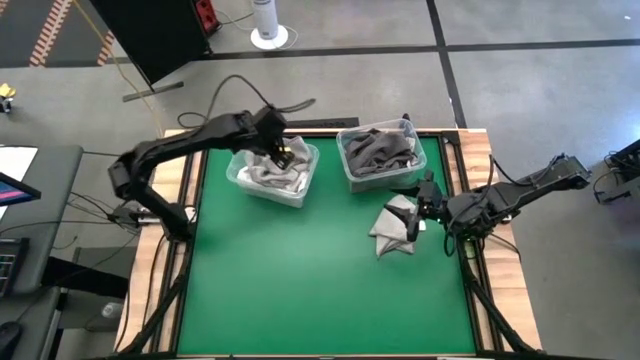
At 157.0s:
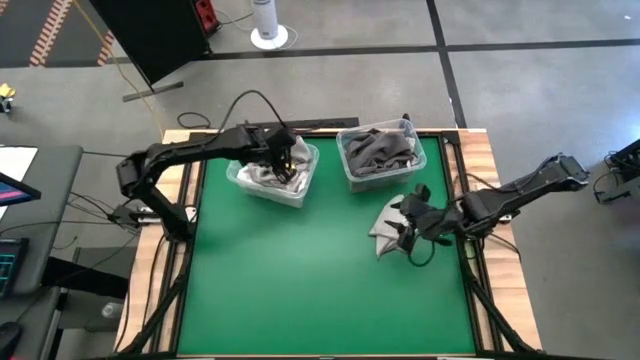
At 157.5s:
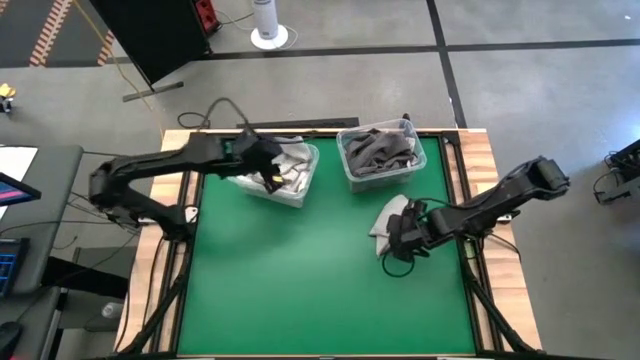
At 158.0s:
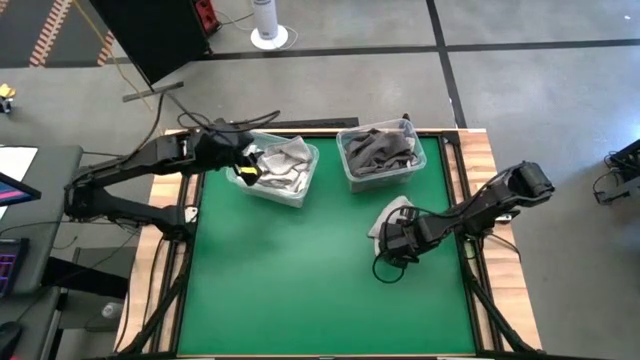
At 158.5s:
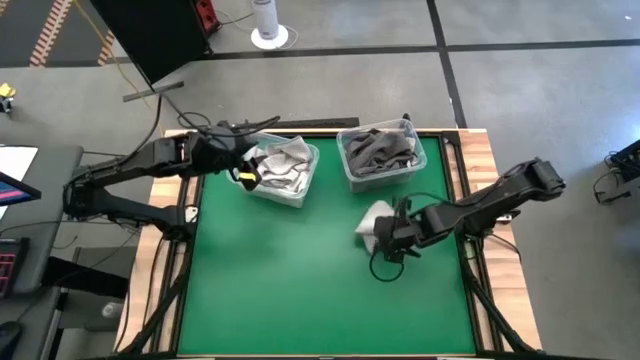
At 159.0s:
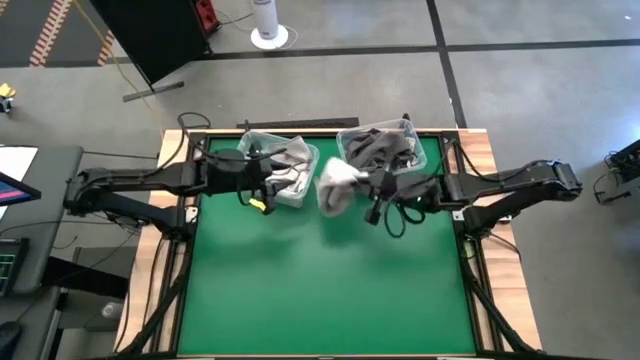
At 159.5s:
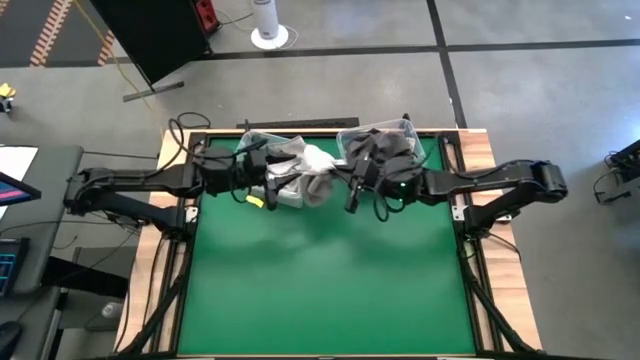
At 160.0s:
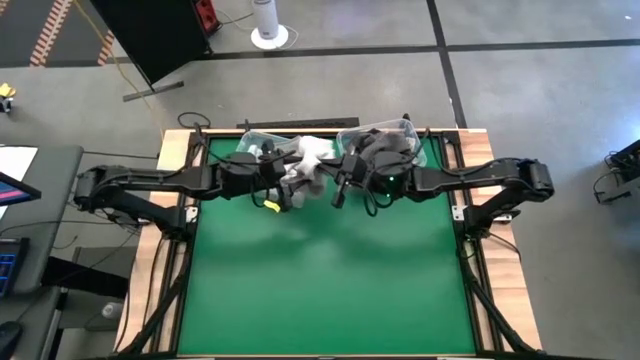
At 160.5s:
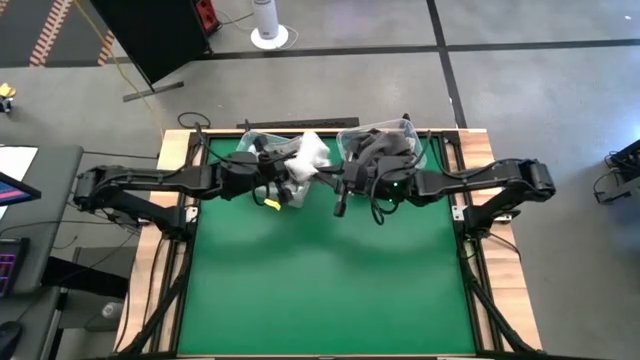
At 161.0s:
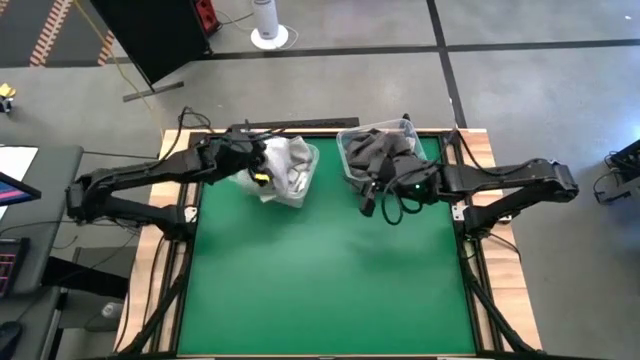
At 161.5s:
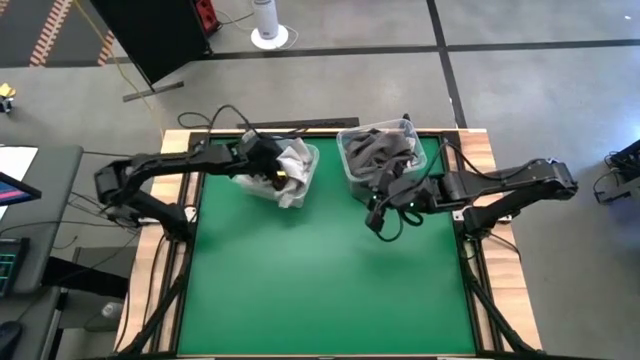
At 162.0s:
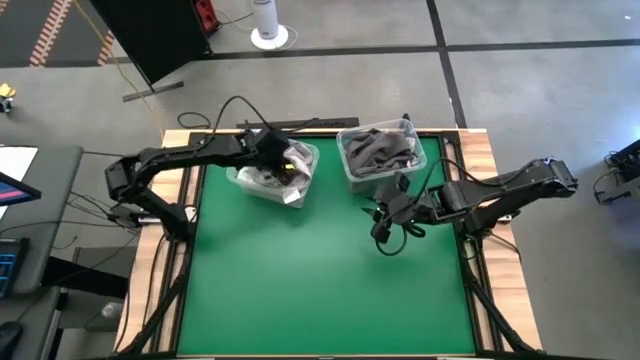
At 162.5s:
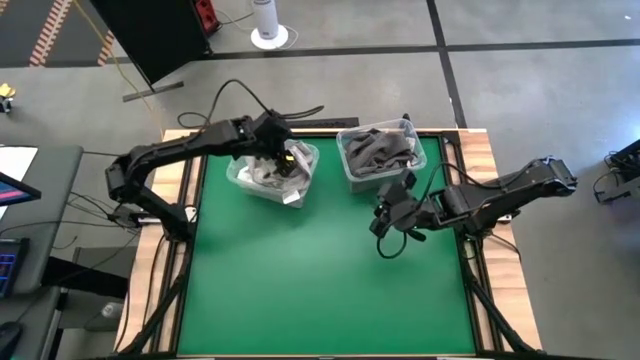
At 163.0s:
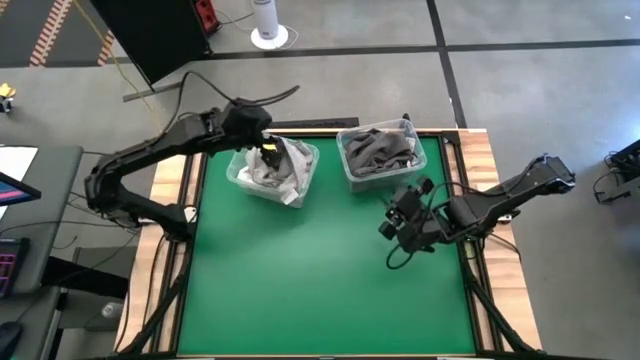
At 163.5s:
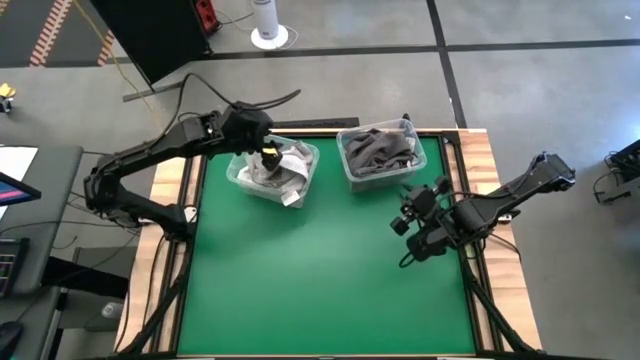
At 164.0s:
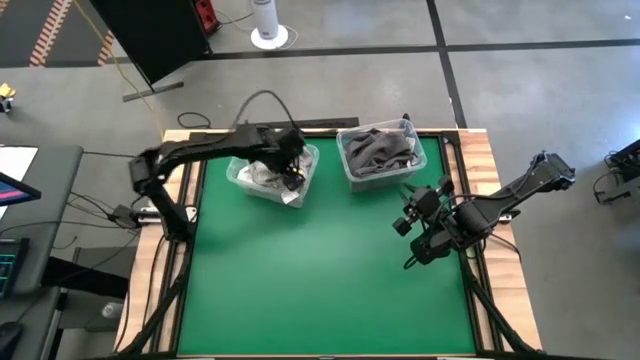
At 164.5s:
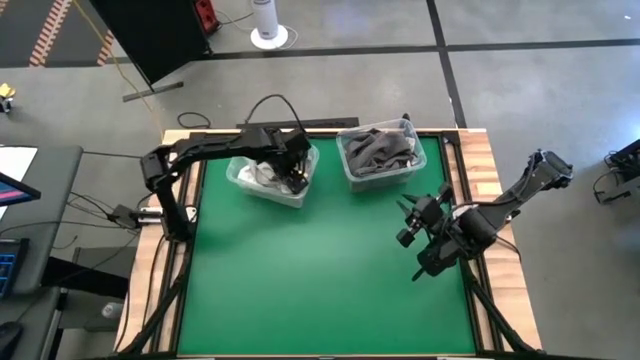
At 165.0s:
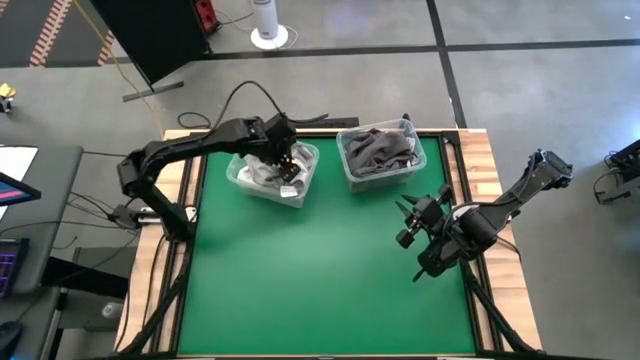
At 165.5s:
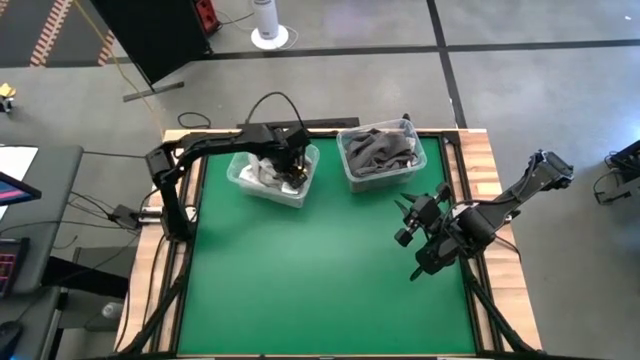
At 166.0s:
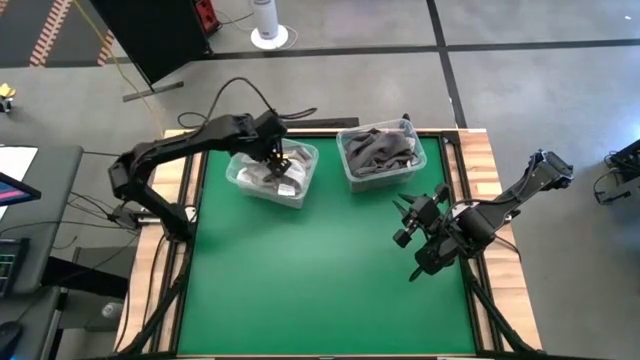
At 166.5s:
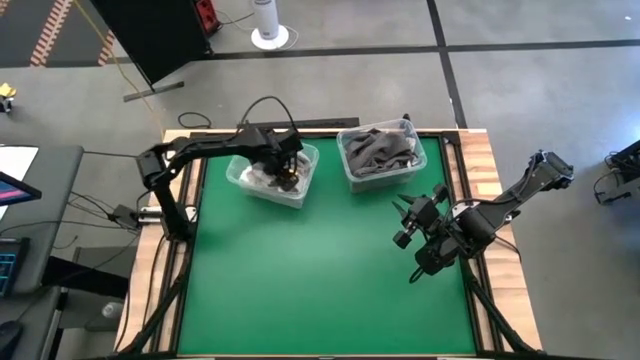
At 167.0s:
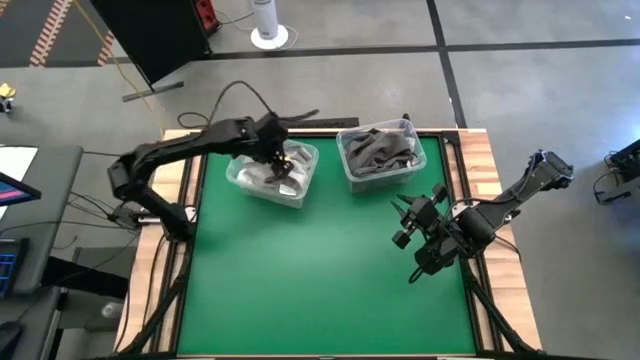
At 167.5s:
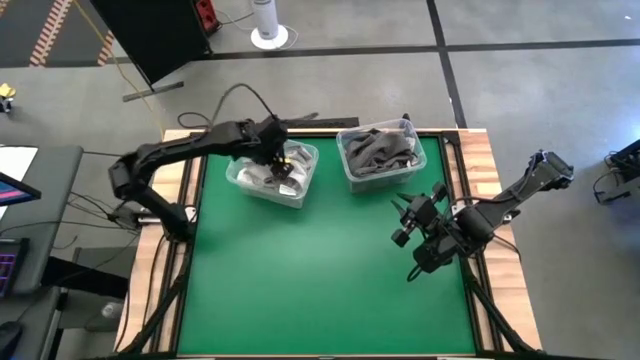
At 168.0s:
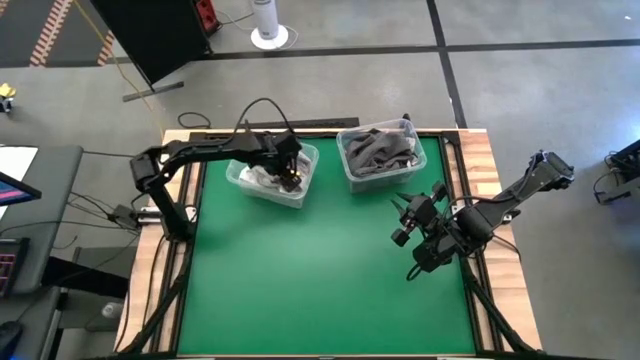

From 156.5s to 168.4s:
Task: Sort towels by color in basket
Put the gray microfiber towel into the left transparent bin

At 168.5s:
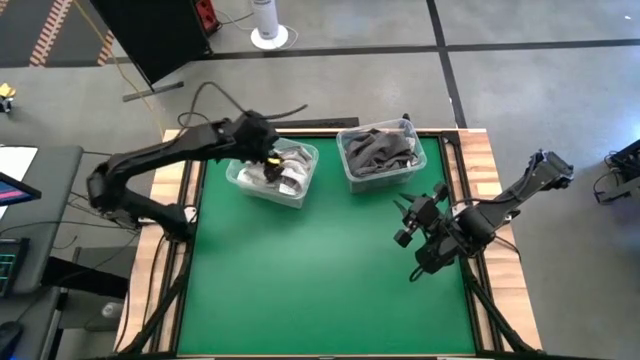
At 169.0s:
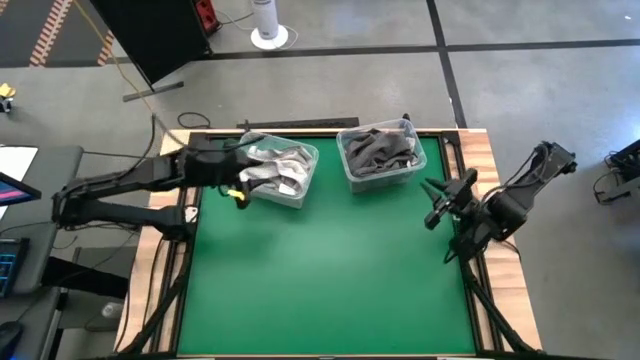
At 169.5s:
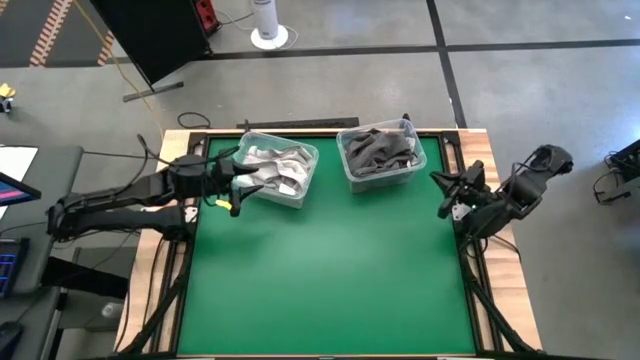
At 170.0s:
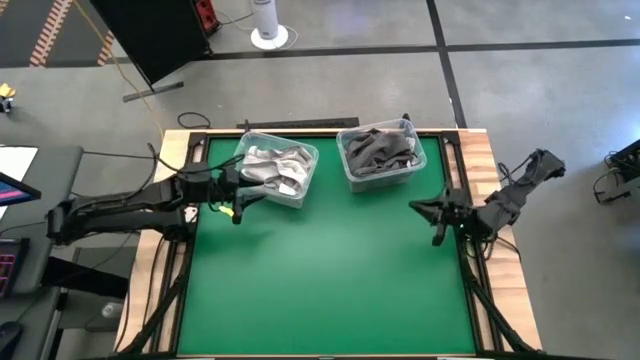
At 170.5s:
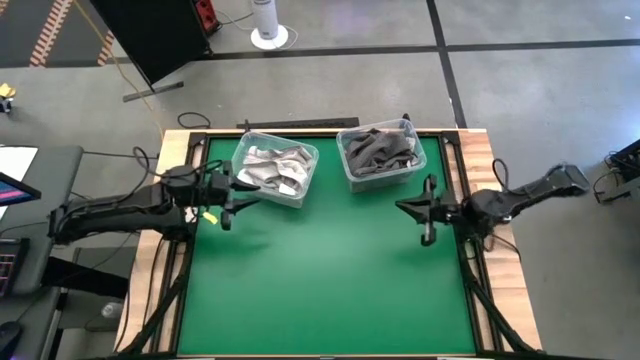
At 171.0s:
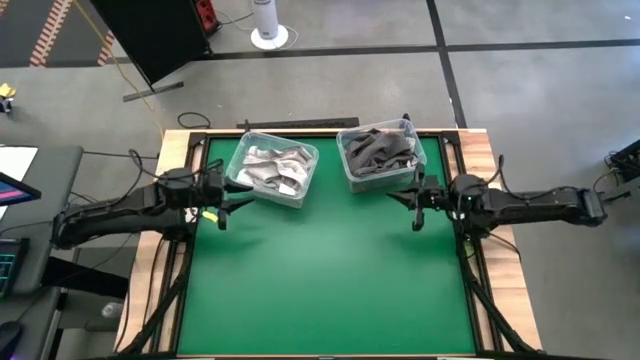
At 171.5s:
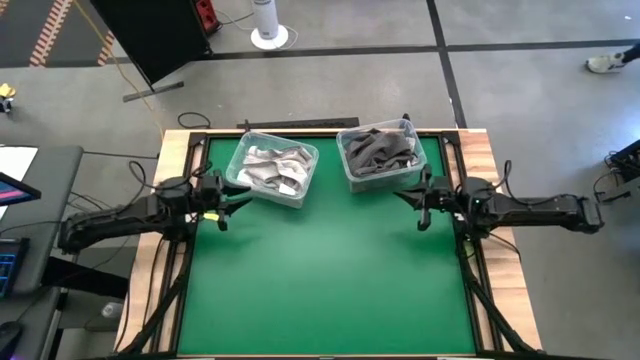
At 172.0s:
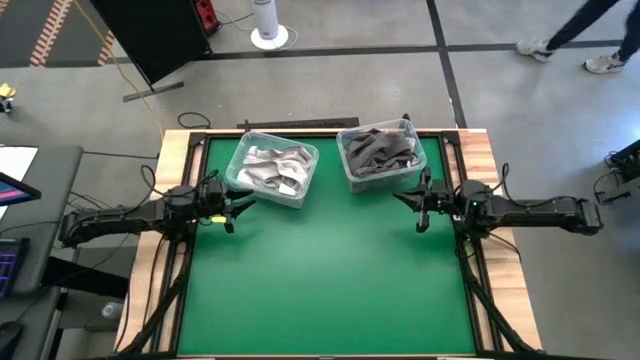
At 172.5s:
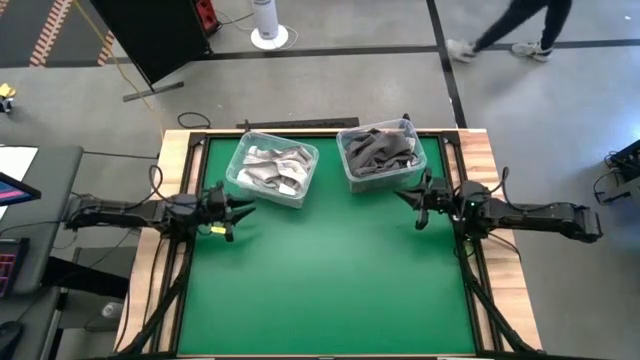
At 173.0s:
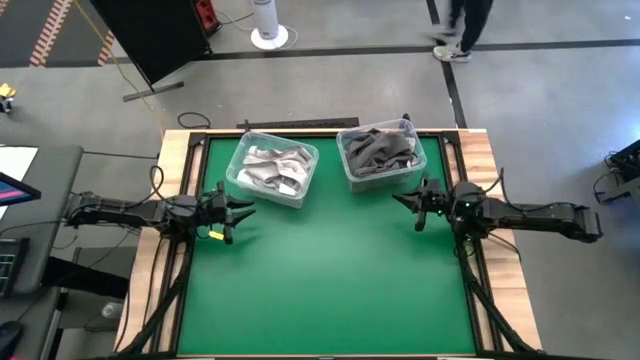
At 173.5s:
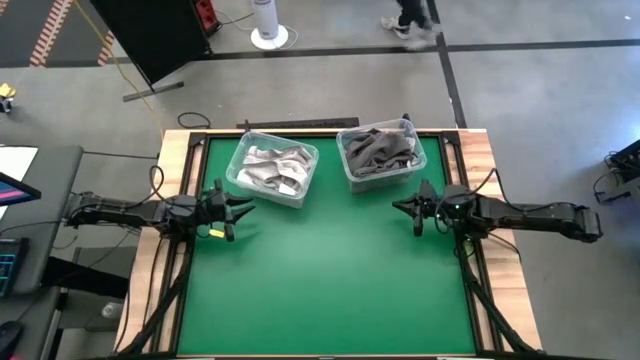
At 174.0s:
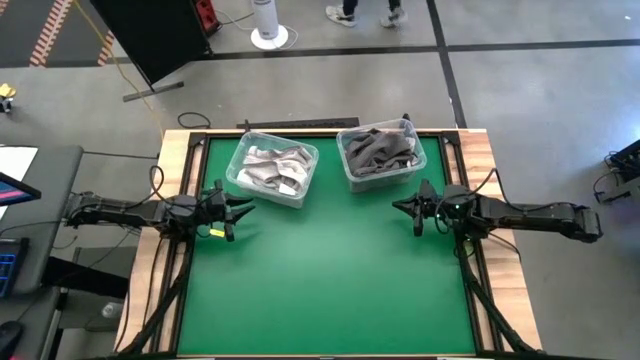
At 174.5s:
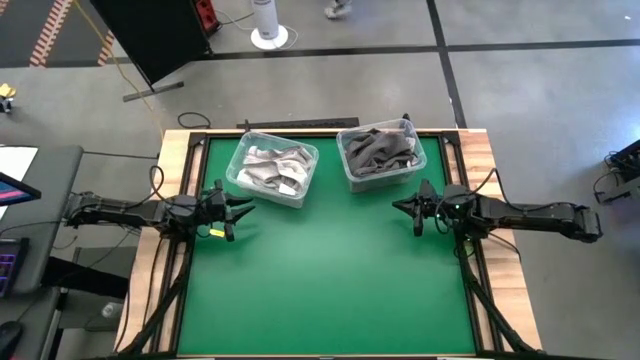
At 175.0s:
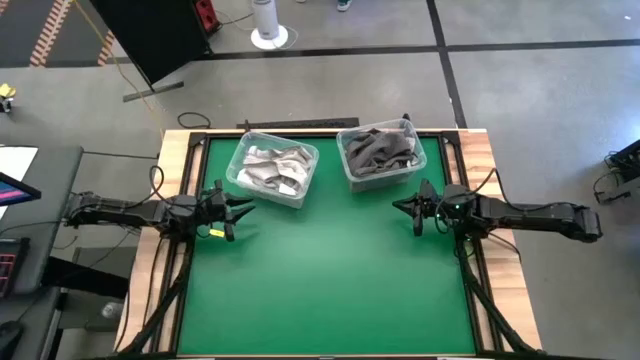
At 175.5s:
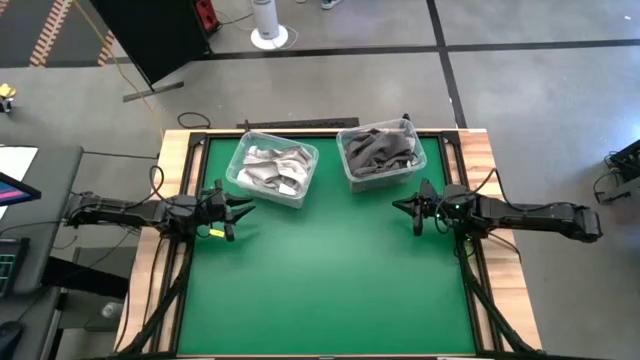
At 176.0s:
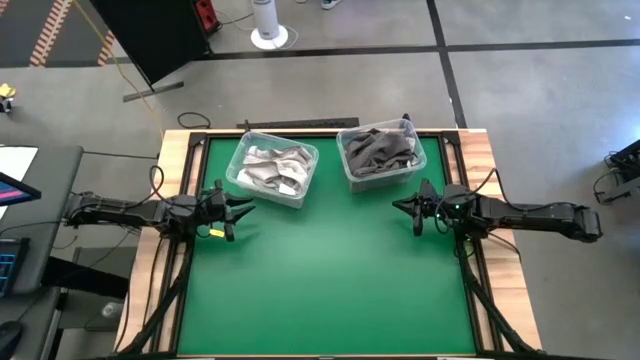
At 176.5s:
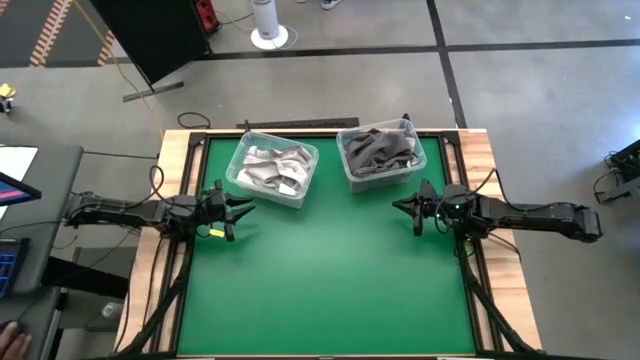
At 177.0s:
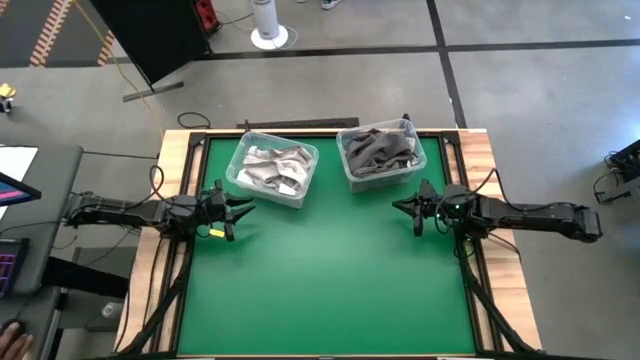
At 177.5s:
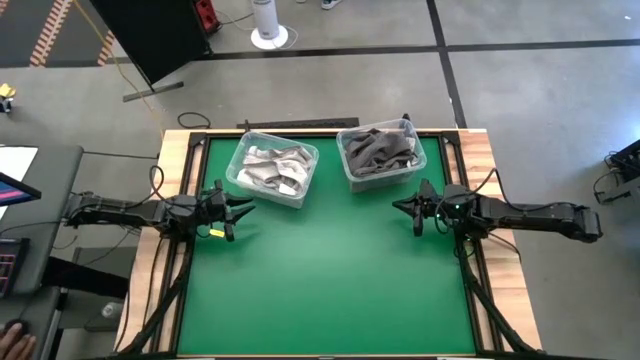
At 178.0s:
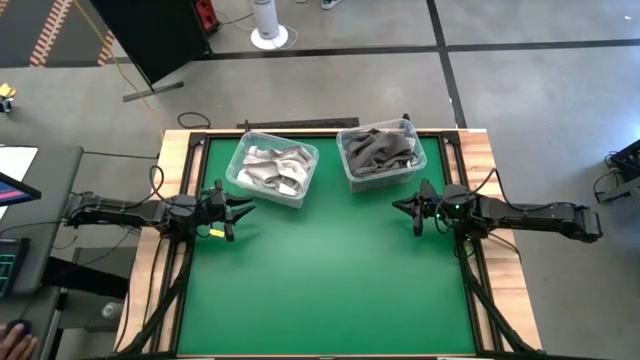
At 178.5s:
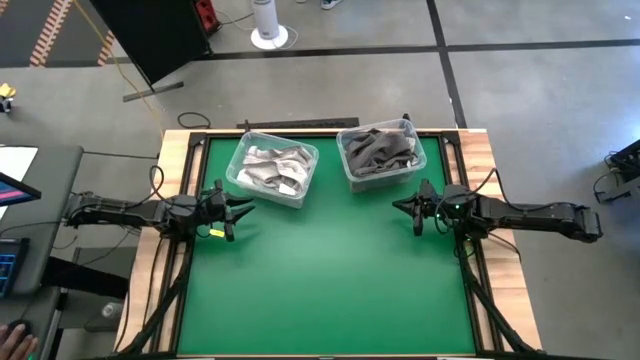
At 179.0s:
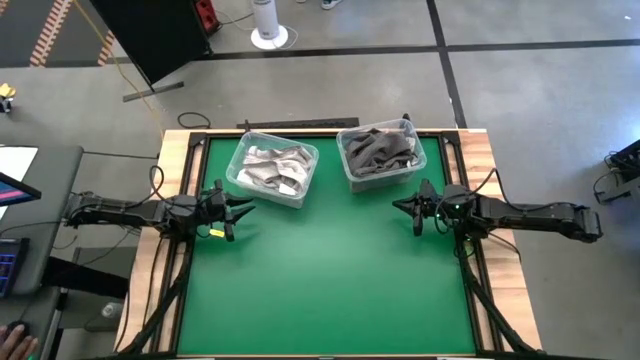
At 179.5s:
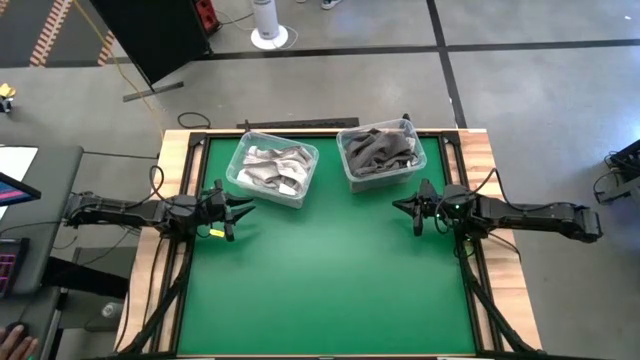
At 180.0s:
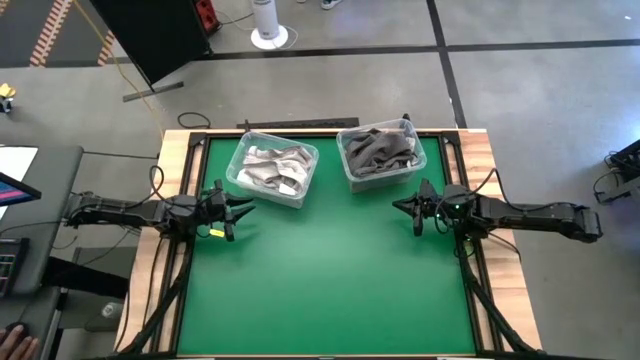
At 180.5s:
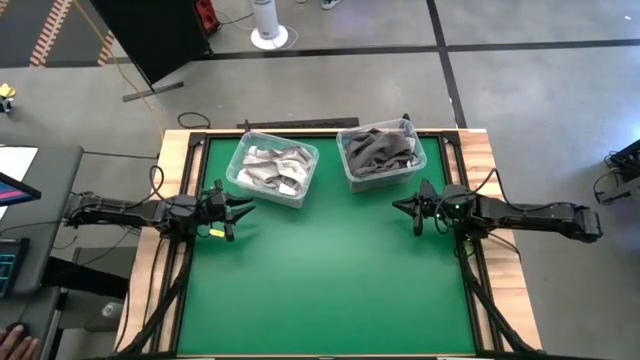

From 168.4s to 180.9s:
Return to Home Position
